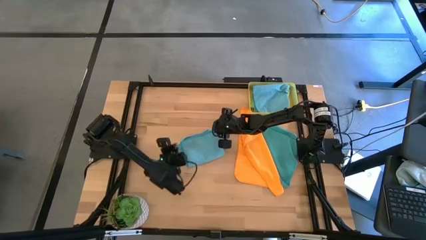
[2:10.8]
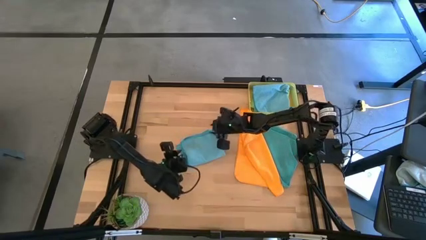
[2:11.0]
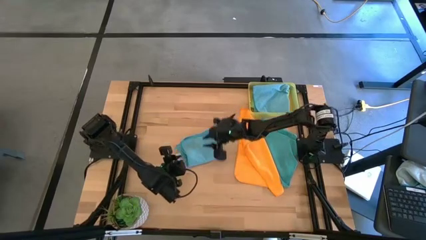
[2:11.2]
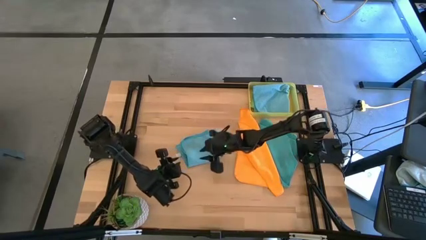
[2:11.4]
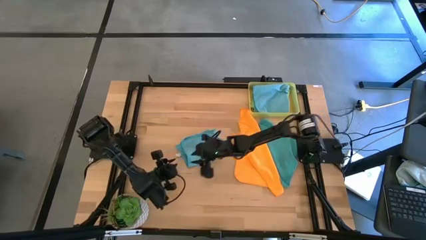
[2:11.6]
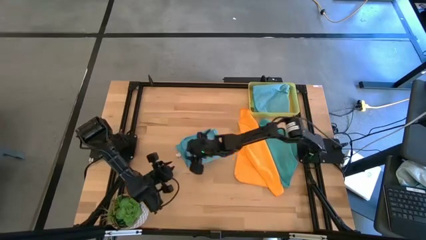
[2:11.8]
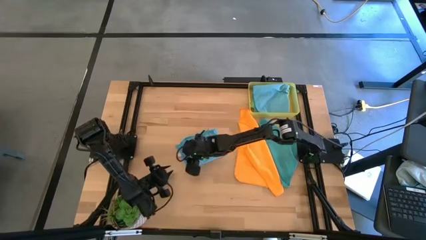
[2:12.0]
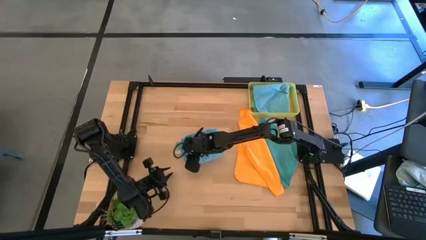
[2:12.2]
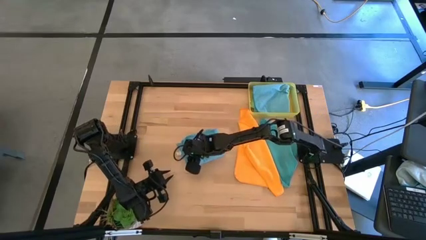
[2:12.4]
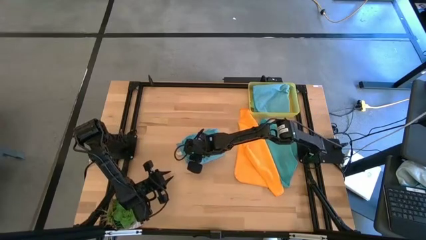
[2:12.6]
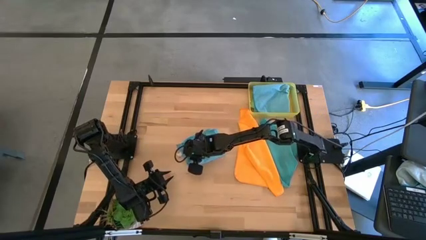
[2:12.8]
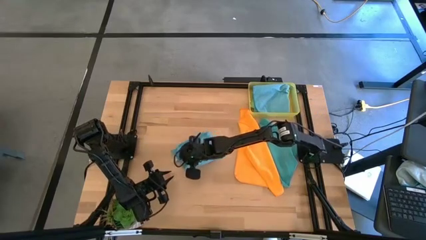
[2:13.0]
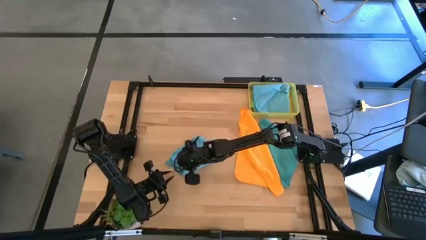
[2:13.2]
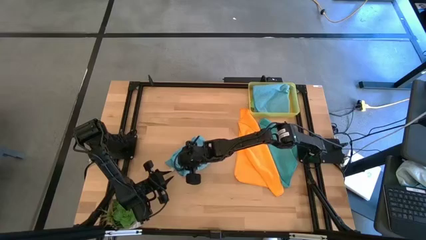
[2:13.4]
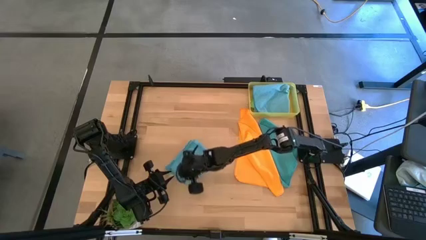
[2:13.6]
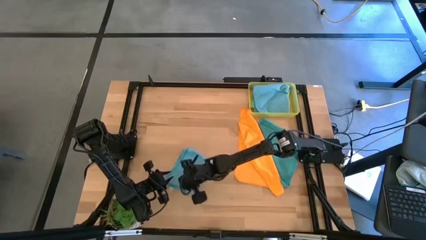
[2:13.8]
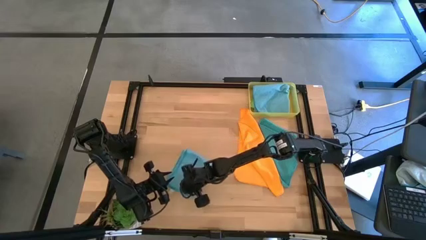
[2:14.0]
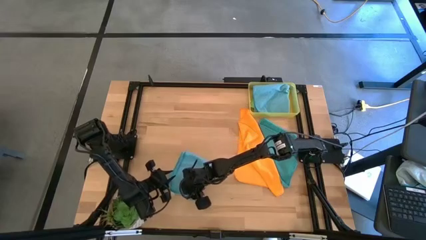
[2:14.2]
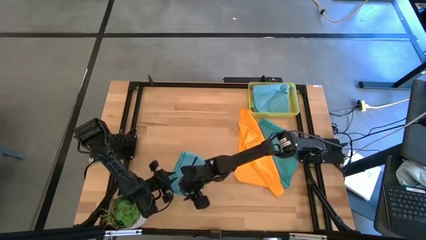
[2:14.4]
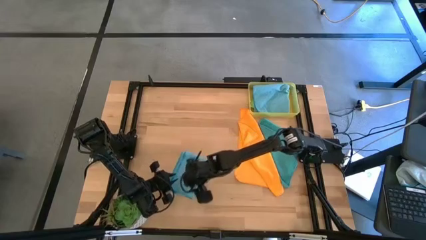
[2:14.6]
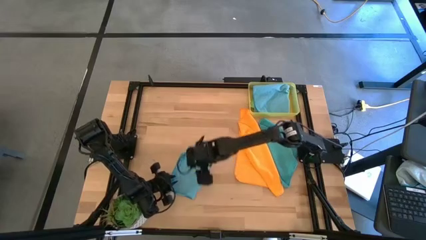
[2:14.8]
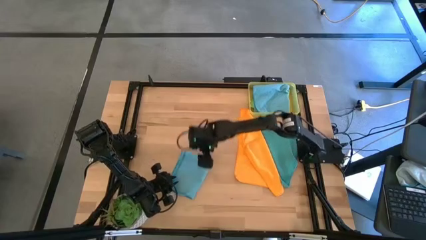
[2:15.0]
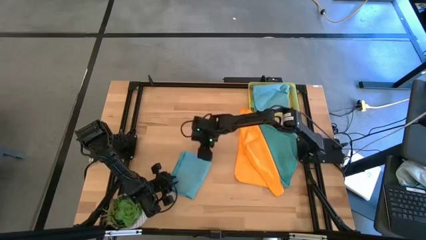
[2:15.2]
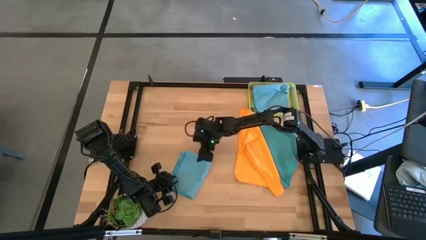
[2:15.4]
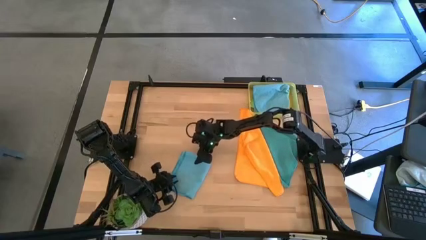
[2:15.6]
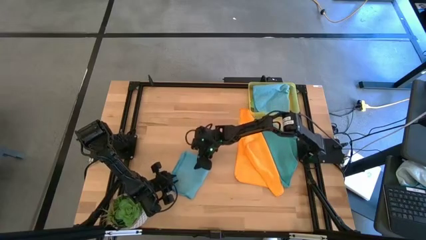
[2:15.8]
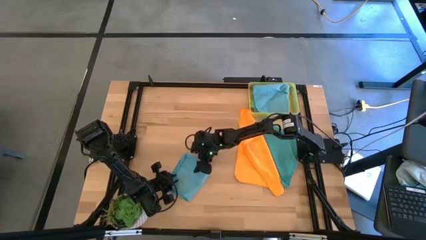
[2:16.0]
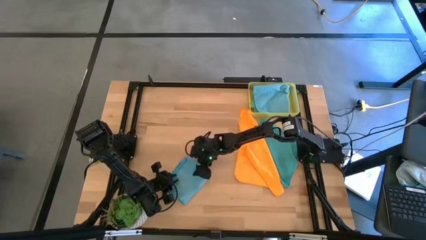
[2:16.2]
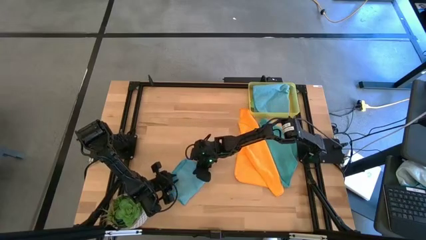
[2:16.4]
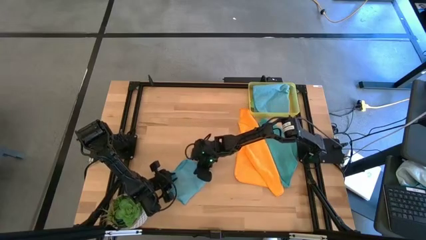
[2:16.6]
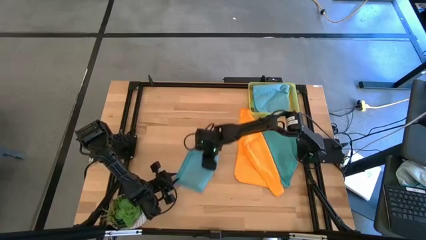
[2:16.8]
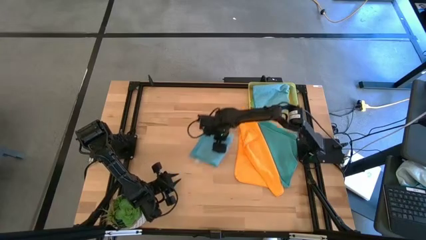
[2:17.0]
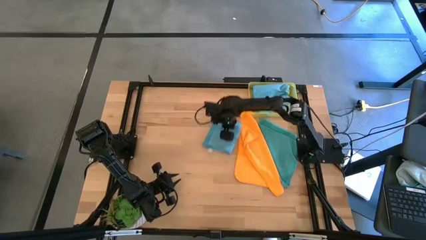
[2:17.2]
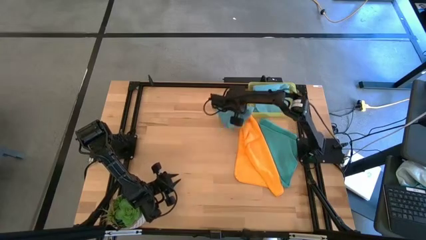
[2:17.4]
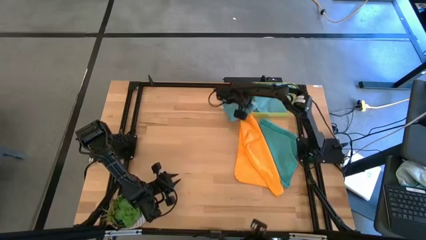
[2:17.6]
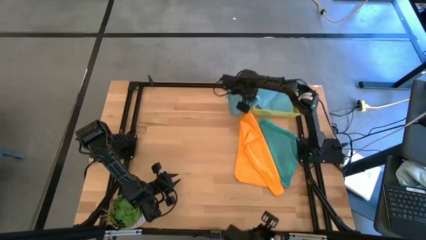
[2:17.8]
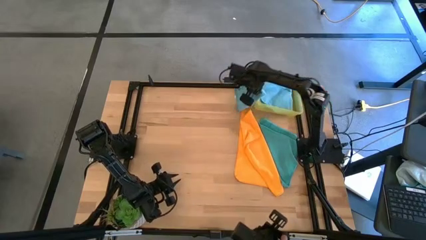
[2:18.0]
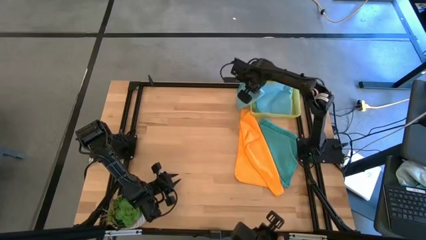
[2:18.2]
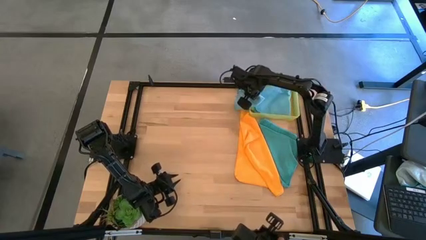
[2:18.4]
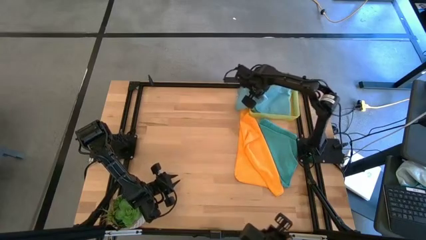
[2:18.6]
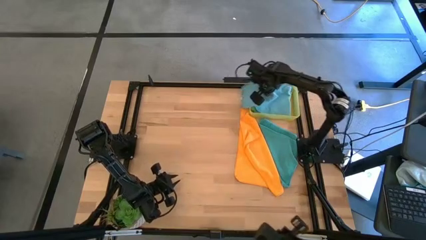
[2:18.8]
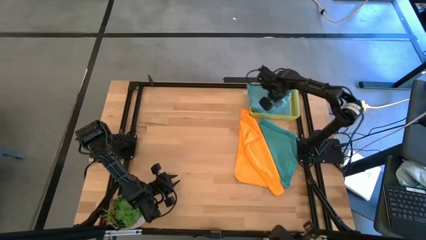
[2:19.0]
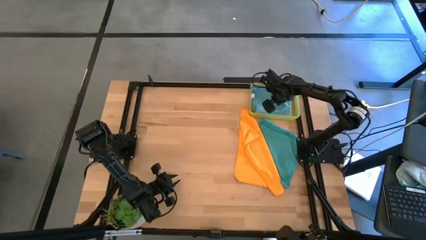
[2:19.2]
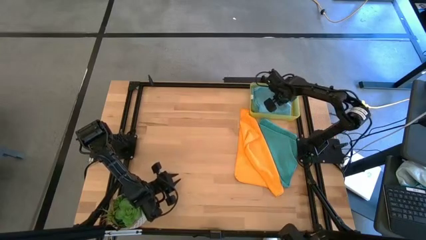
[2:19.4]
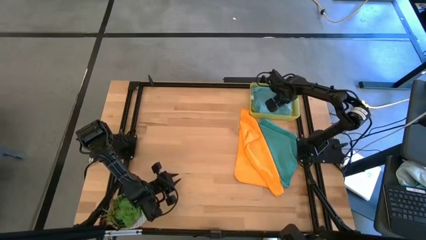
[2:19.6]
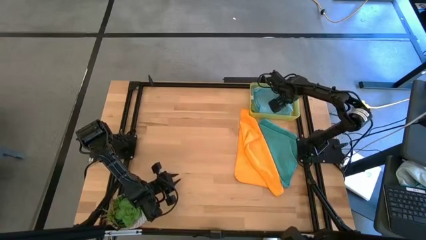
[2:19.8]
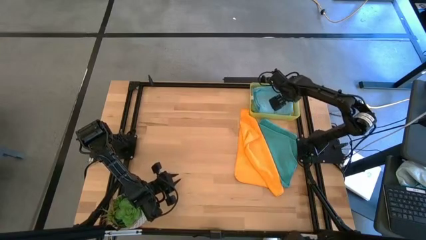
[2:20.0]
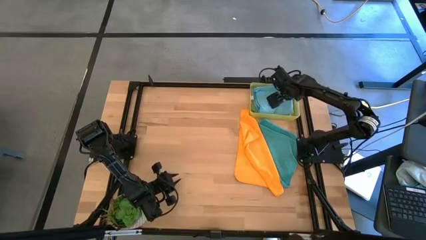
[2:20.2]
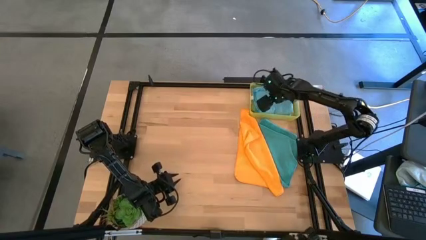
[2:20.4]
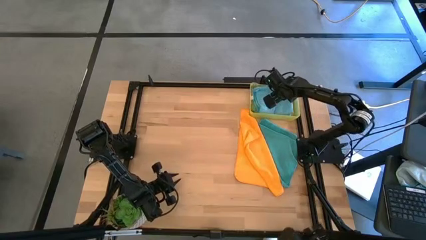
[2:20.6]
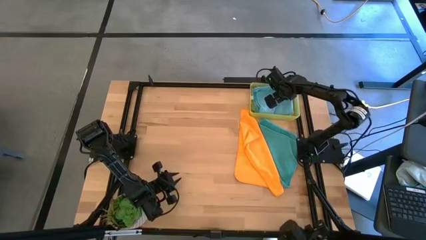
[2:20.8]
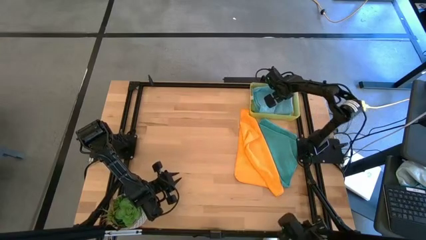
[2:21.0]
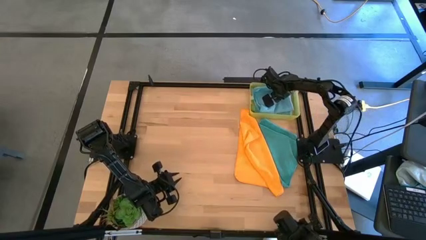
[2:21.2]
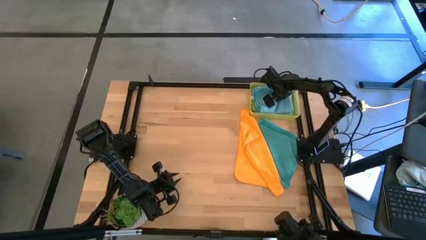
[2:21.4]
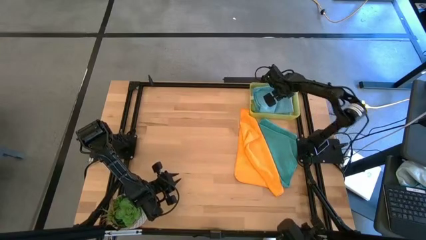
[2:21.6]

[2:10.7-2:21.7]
Task: Fold microfiber towels
Put the folded blue microfiber cloth into the yellow bin

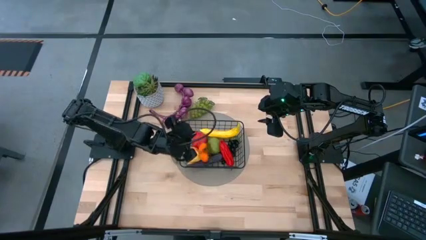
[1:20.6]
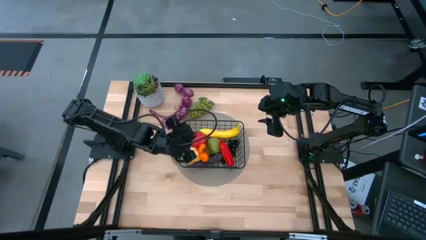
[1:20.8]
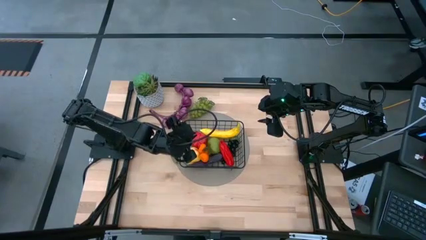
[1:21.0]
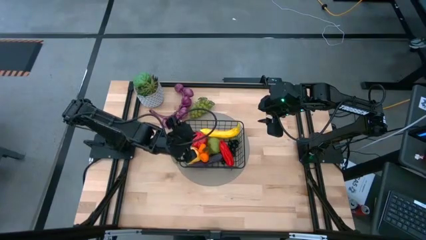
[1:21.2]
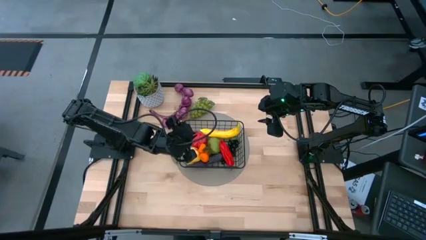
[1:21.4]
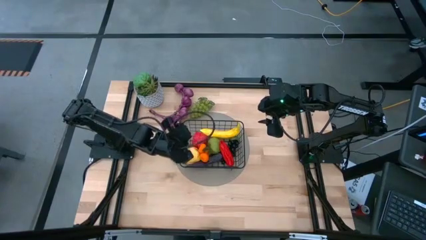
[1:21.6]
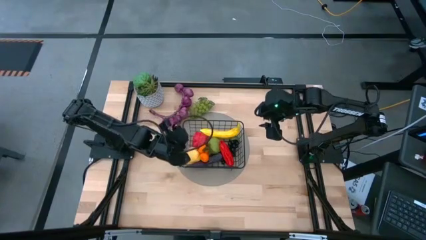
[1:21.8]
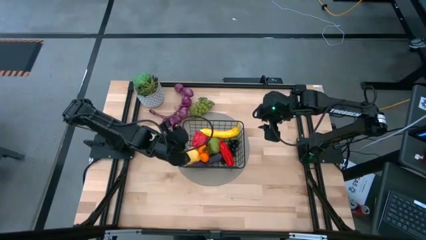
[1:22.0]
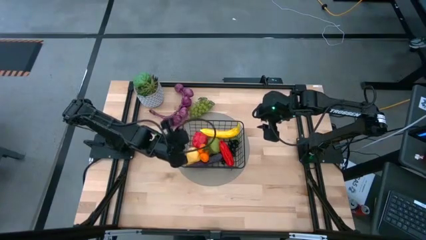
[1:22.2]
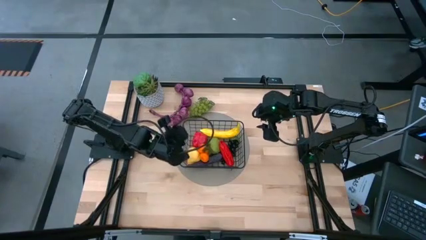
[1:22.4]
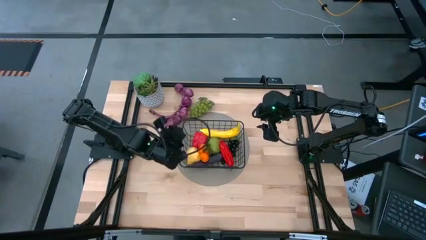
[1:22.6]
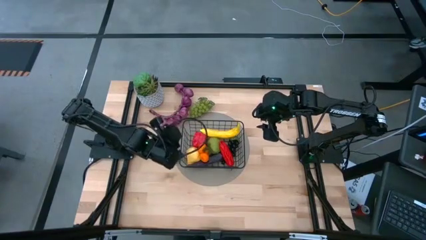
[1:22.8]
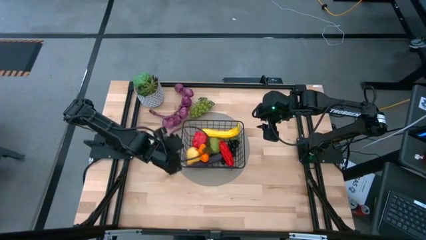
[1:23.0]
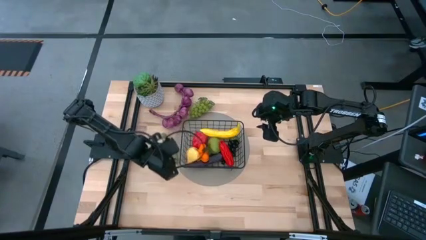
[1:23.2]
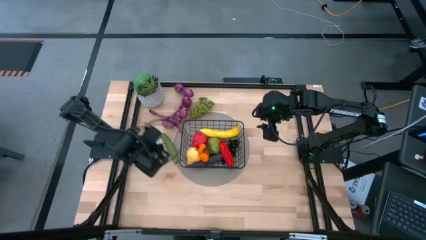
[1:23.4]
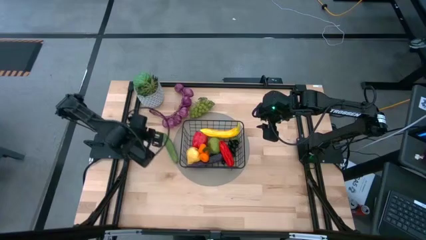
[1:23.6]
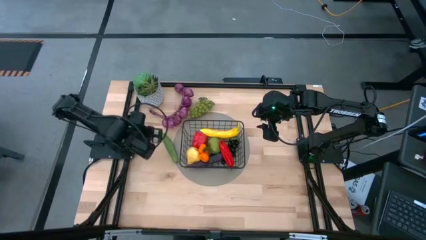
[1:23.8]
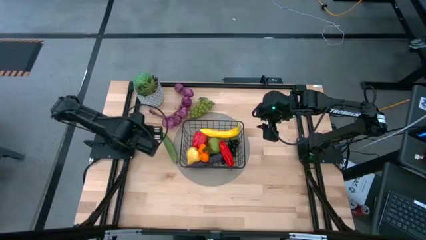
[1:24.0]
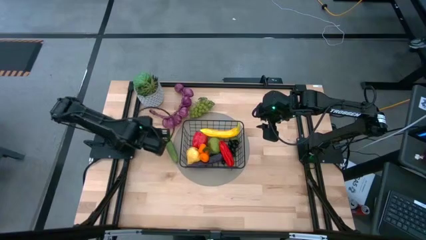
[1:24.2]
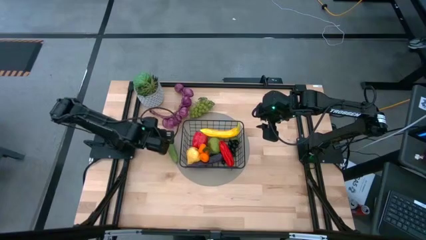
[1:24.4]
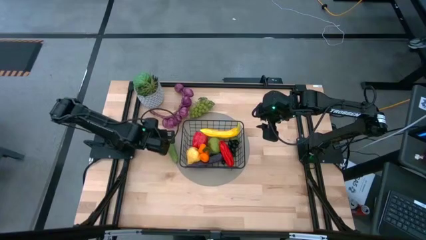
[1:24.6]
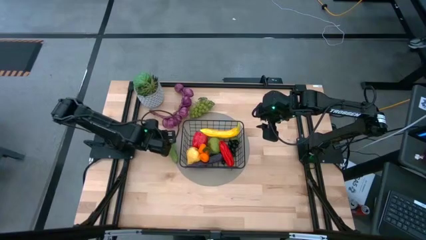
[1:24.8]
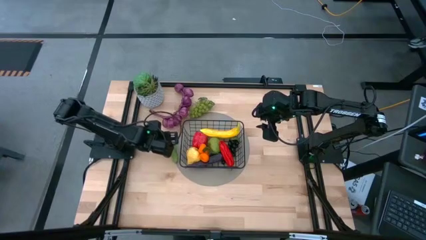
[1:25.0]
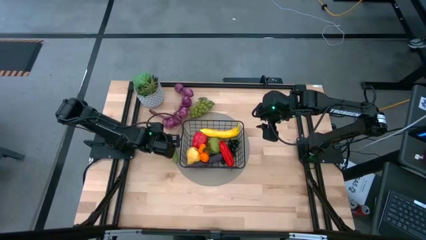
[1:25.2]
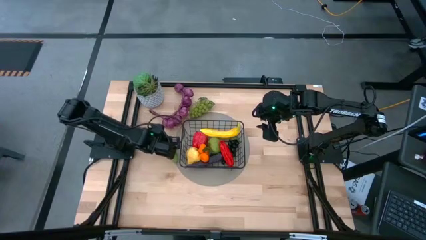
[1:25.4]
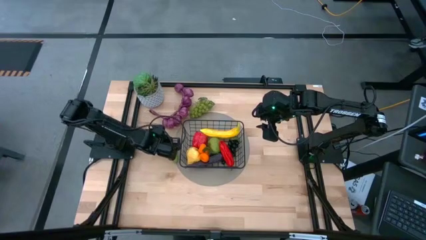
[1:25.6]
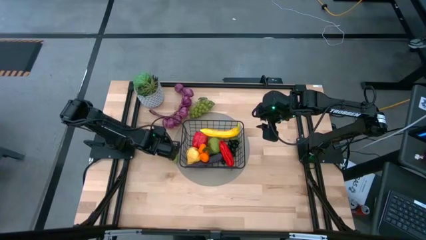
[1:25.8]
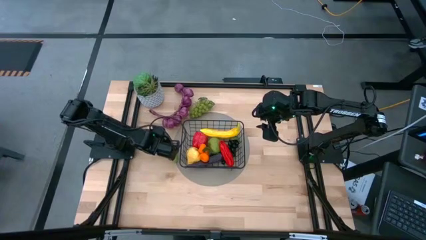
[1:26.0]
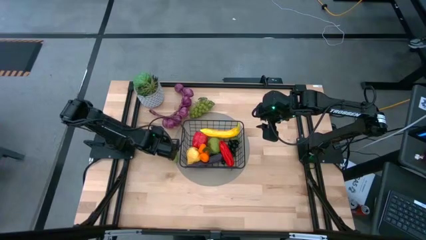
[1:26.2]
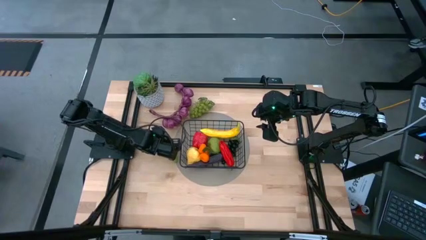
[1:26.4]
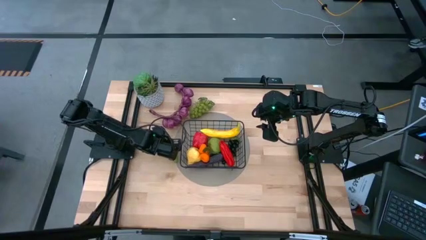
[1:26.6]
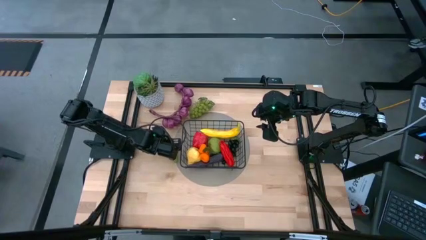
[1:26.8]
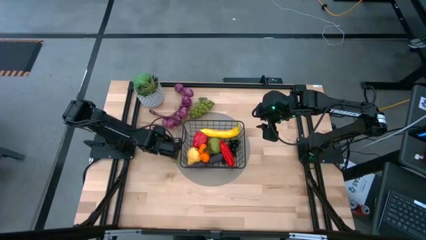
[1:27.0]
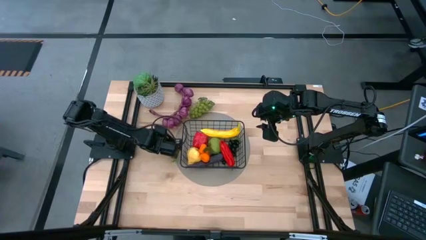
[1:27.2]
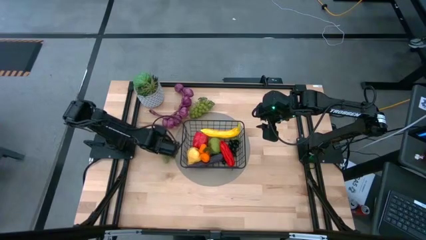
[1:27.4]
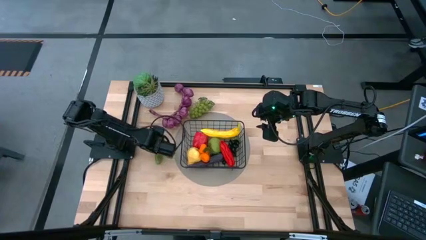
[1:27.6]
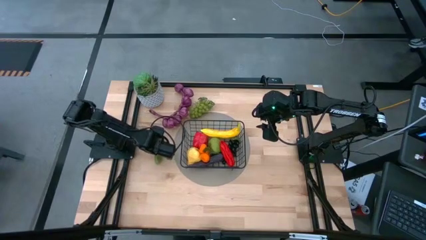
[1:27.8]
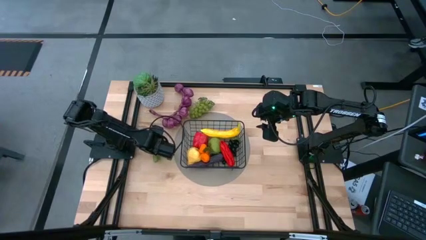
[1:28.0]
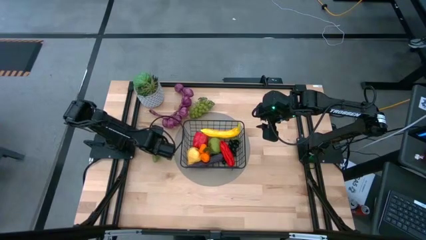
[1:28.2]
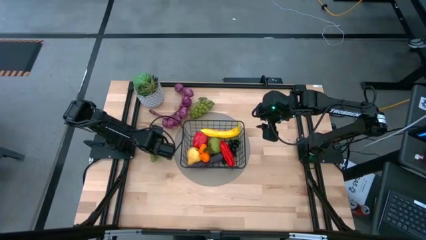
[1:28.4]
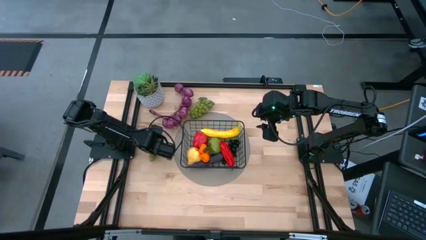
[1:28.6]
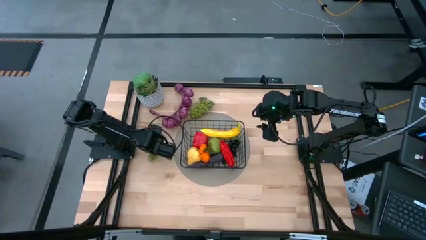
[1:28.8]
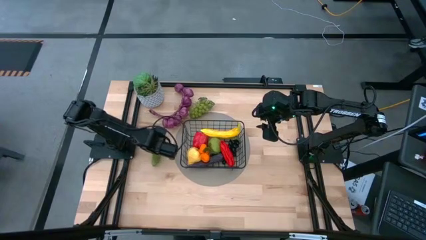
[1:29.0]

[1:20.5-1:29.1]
Task: Build produce basket
Put the green cucumber into the black wire basket
